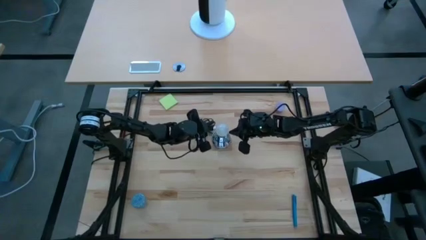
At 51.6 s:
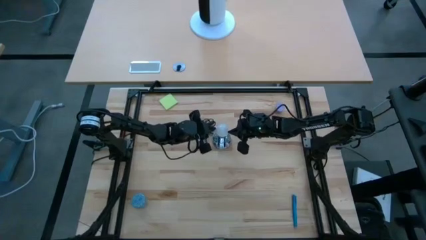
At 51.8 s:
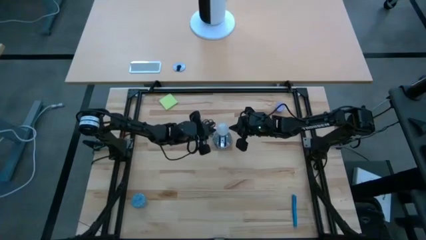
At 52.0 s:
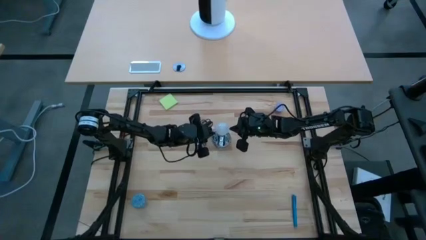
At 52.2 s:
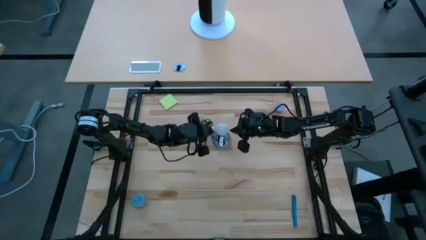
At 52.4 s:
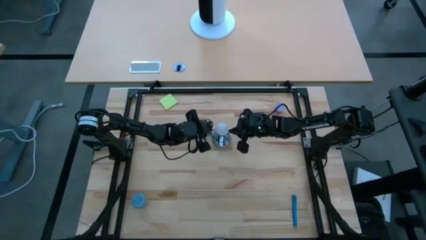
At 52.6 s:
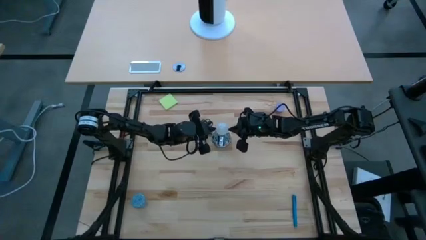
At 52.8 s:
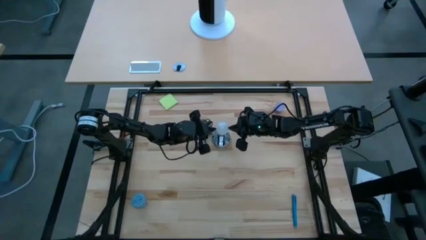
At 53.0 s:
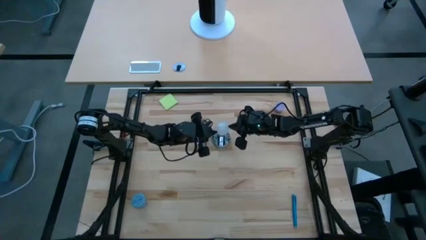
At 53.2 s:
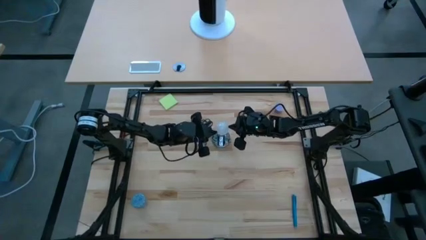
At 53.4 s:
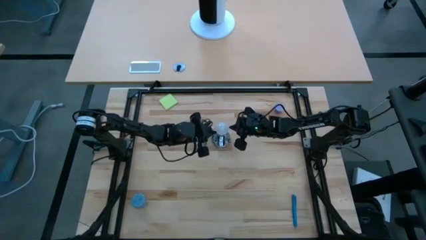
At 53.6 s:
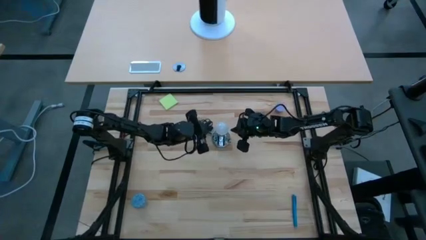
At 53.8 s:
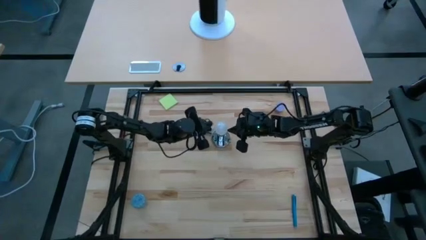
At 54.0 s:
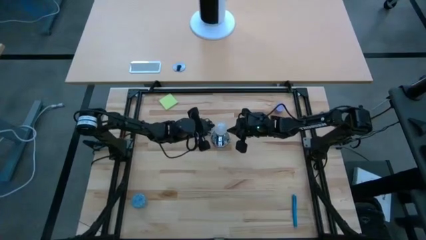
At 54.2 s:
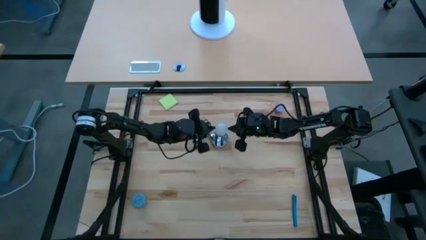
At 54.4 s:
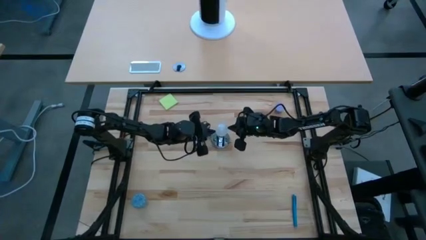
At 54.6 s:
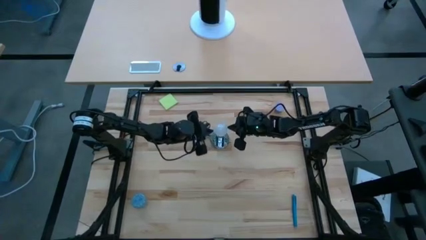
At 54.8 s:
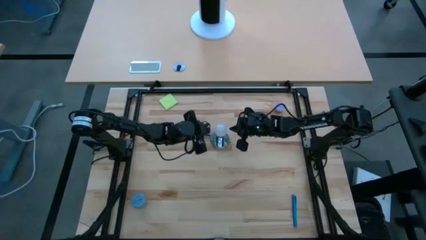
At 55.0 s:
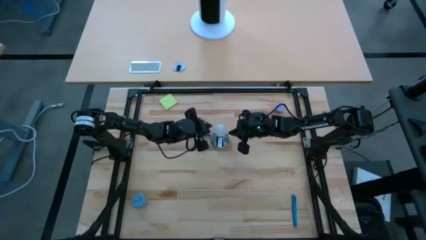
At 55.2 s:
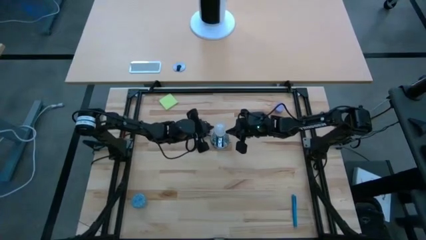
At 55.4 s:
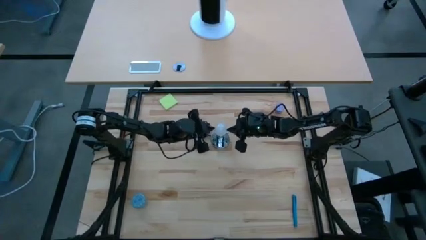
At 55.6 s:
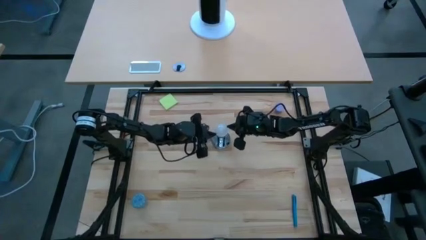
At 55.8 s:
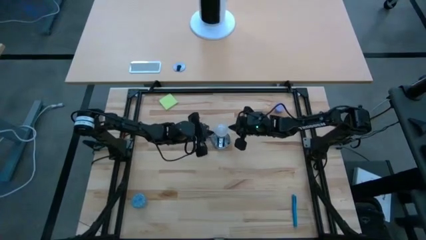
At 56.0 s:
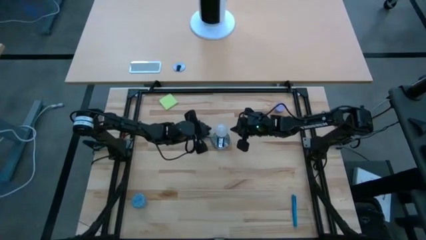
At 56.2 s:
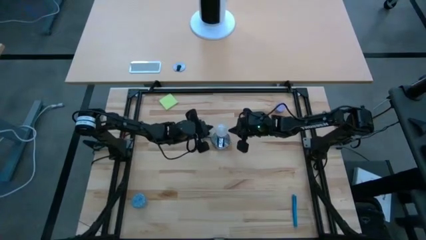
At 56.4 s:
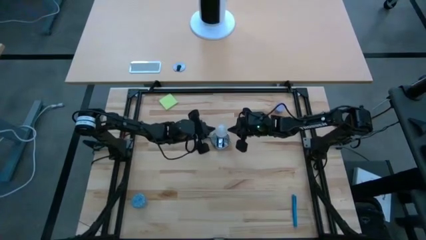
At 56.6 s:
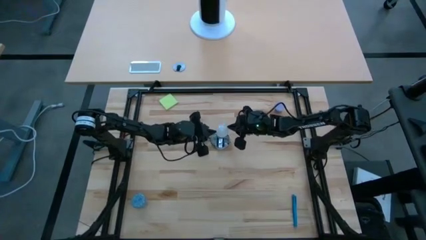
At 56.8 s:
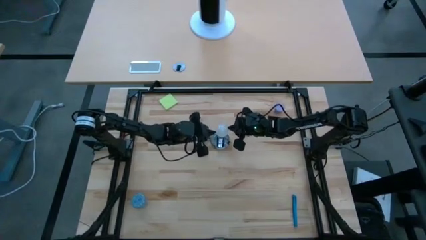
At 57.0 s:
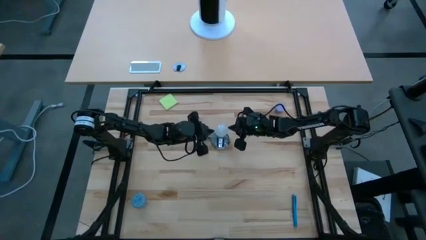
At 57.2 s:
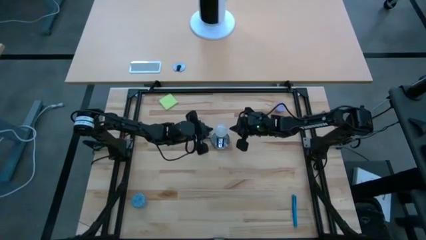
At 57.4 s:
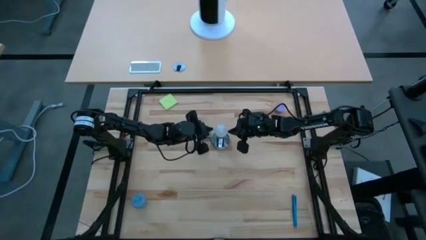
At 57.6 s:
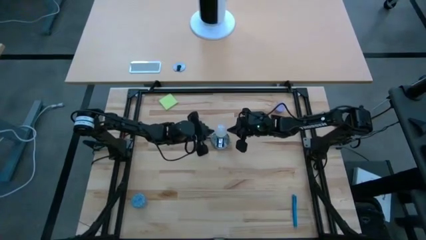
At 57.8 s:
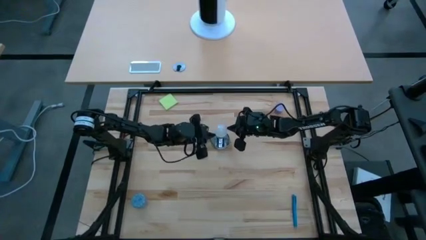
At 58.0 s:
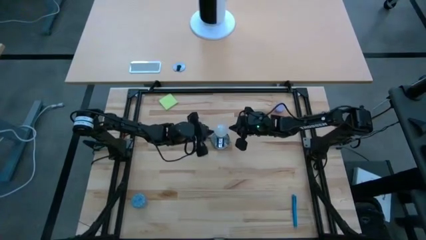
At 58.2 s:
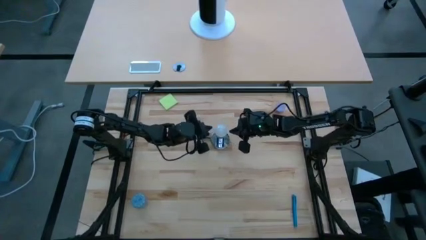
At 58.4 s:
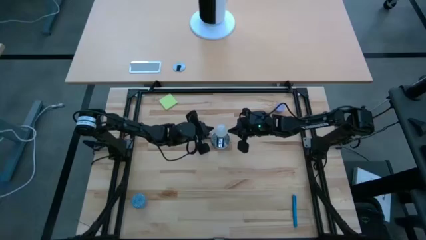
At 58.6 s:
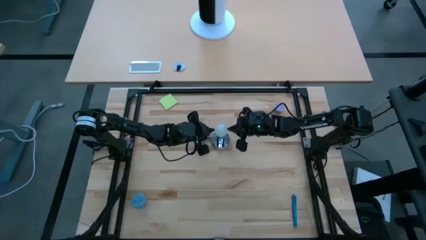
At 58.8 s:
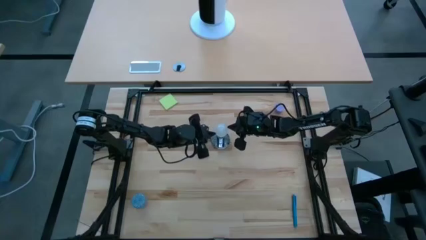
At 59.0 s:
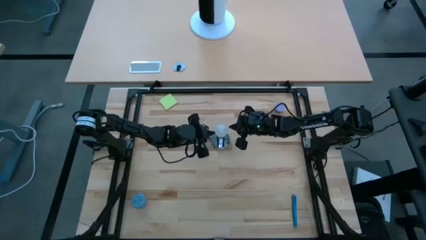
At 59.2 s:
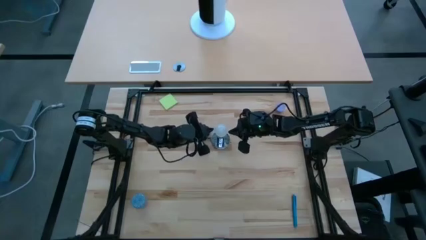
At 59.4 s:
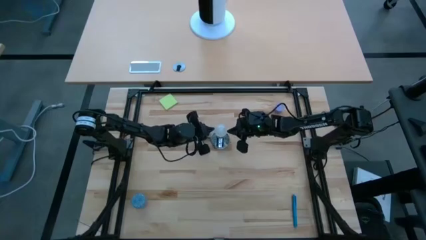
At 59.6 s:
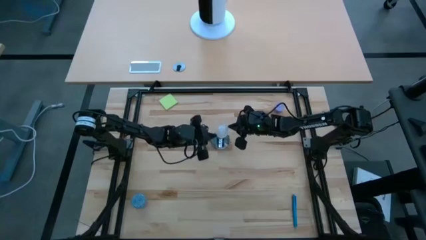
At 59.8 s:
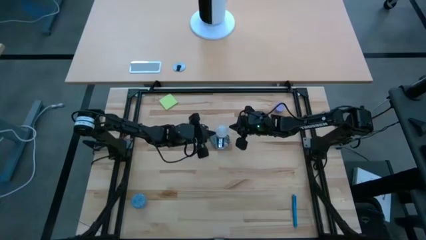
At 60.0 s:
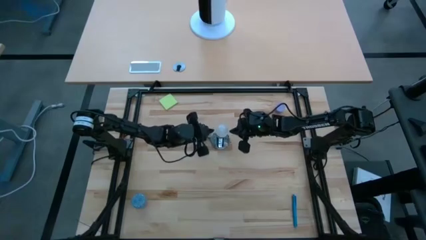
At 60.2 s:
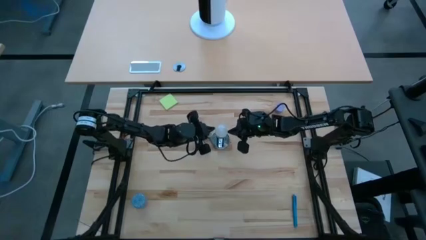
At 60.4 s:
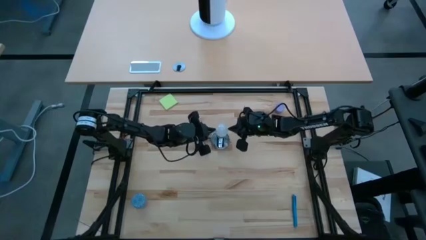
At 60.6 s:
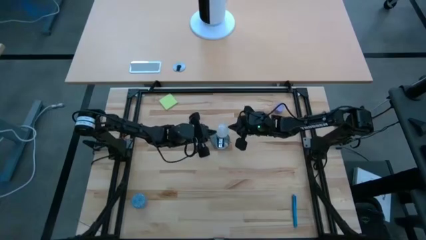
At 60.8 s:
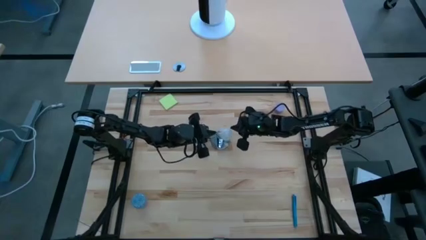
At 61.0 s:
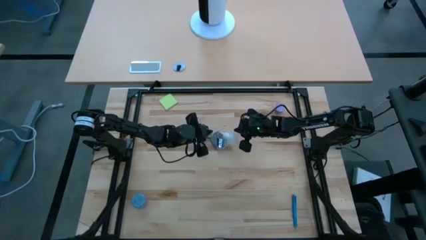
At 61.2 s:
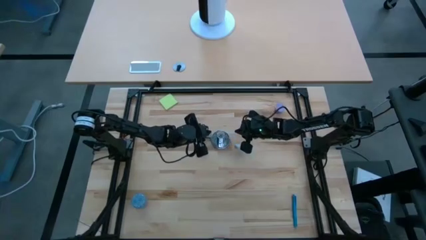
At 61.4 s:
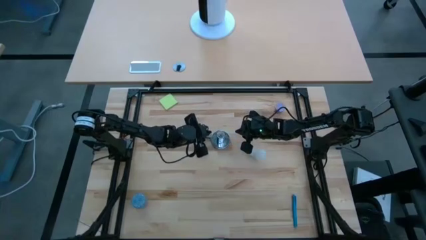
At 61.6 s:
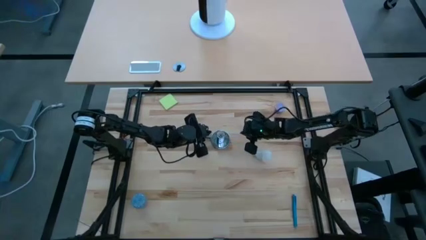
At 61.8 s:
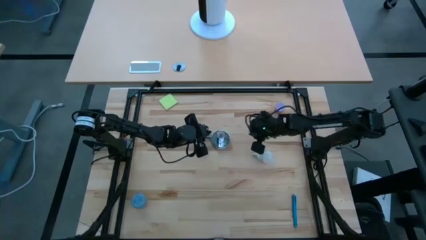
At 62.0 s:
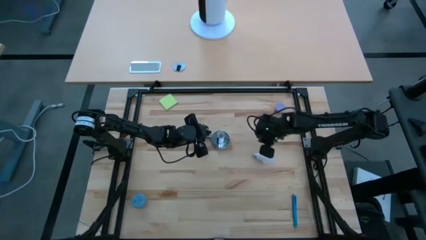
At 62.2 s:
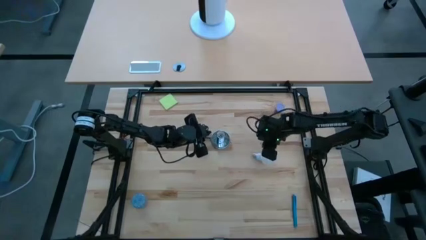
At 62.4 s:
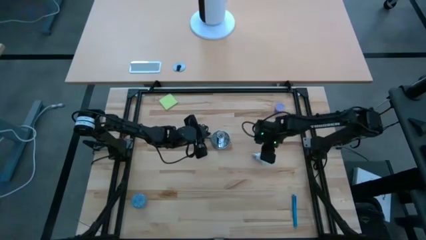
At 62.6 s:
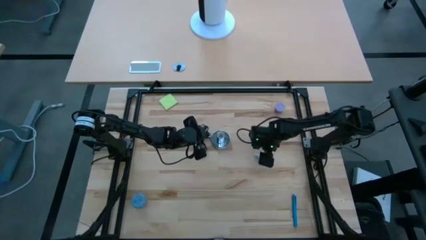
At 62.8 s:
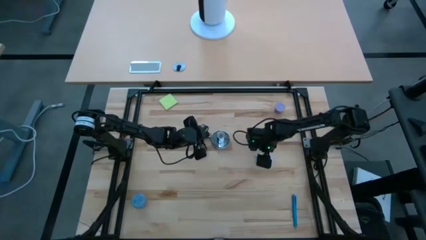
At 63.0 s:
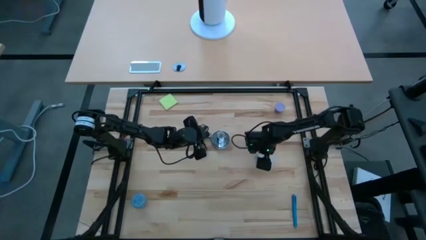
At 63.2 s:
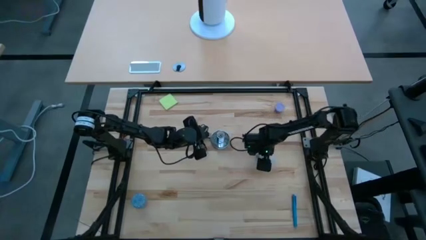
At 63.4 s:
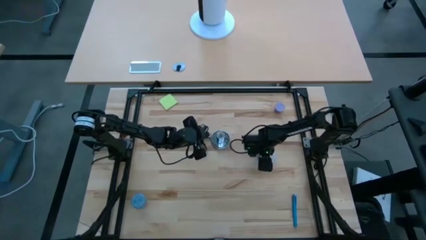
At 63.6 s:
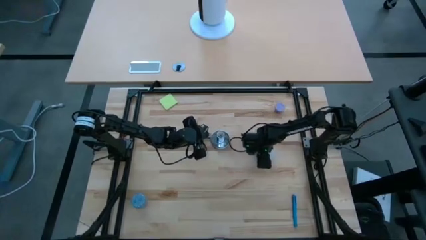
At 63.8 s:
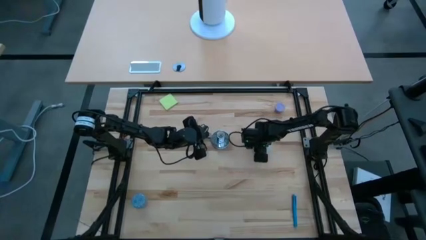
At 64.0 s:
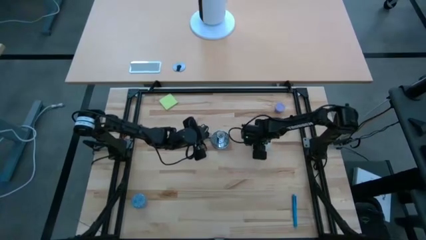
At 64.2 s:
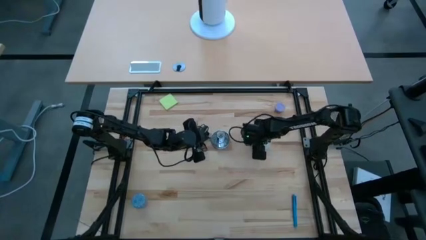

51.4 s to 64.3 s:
Task: Screw lightbulb
Remove the white lightbulb from the silver lamp
